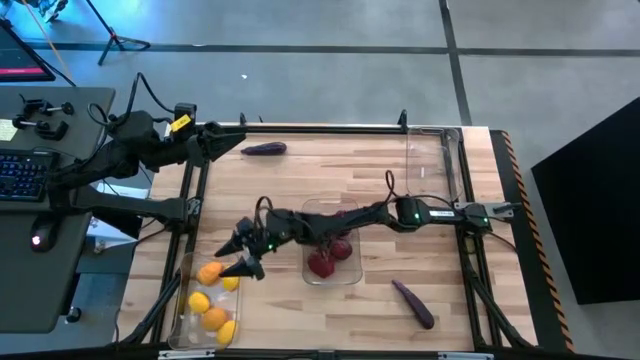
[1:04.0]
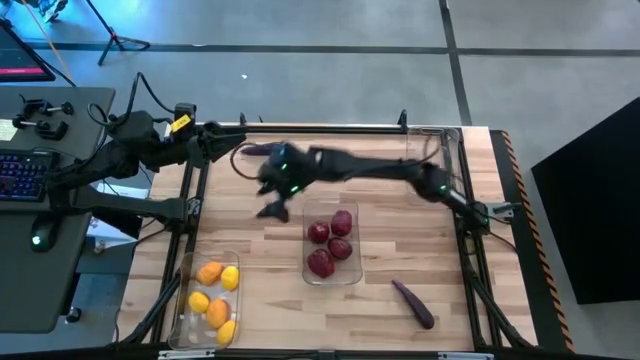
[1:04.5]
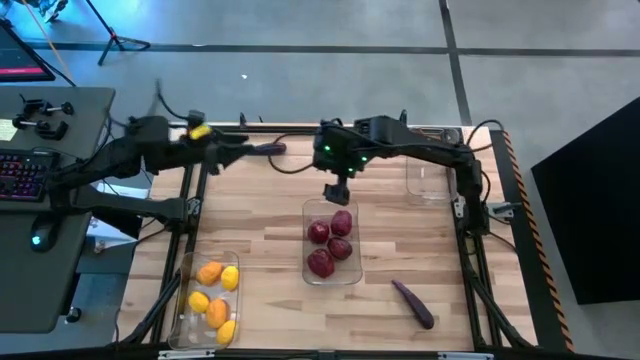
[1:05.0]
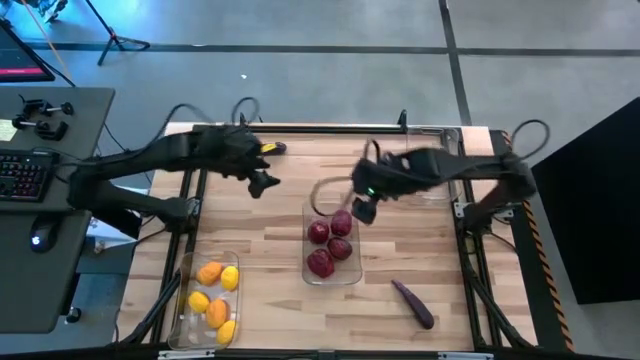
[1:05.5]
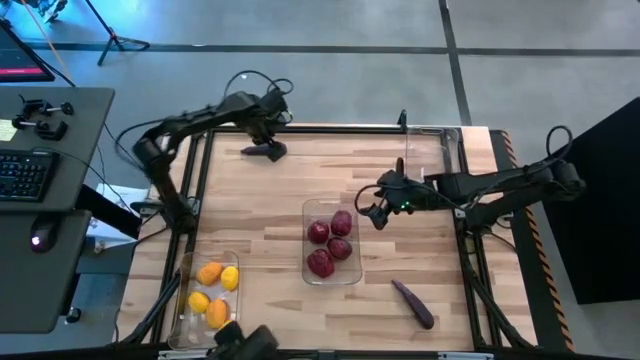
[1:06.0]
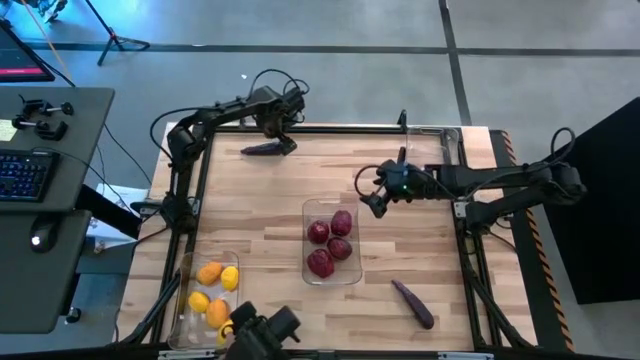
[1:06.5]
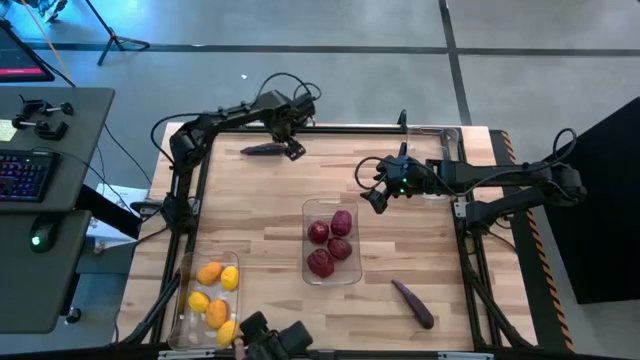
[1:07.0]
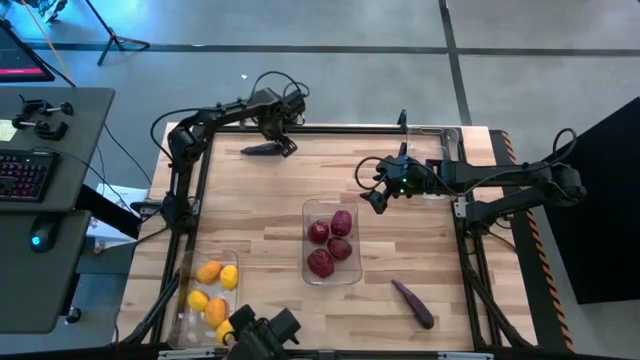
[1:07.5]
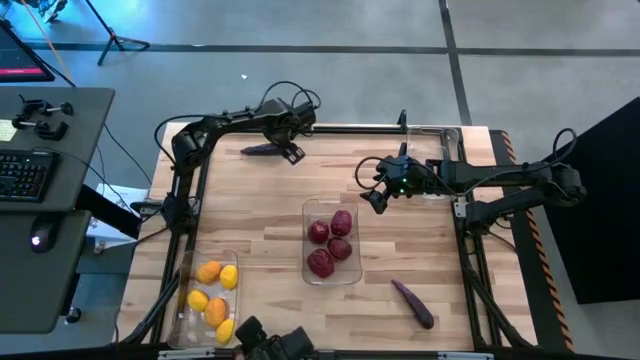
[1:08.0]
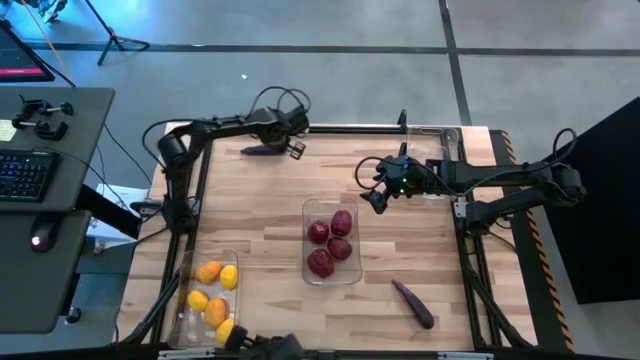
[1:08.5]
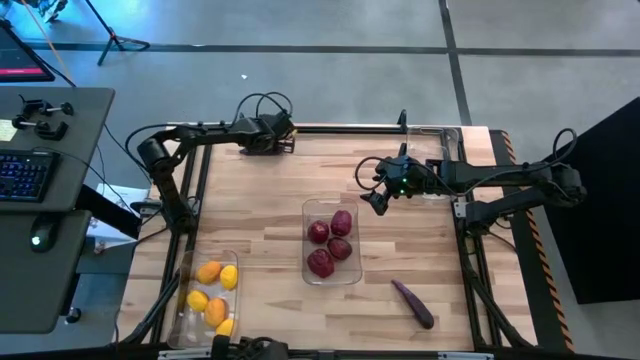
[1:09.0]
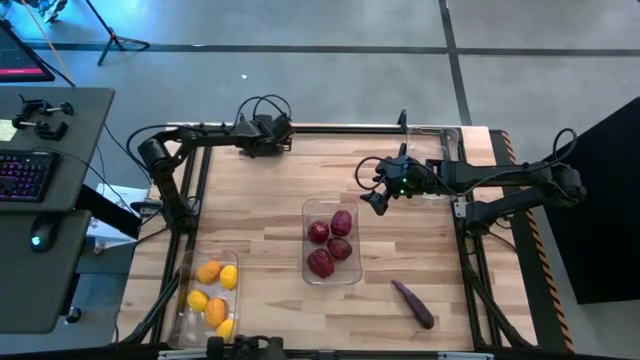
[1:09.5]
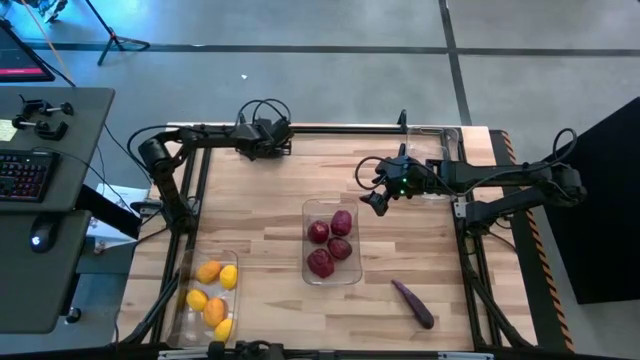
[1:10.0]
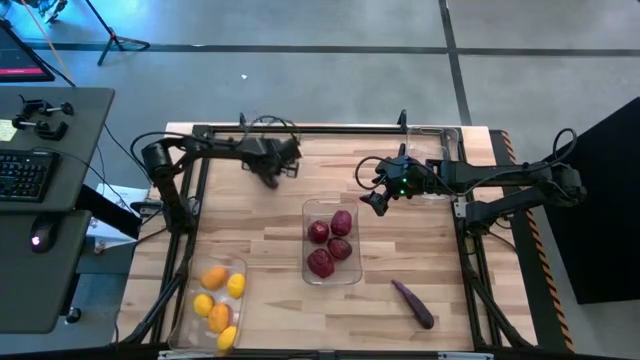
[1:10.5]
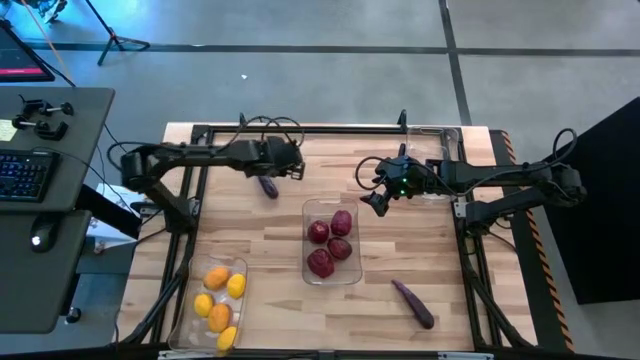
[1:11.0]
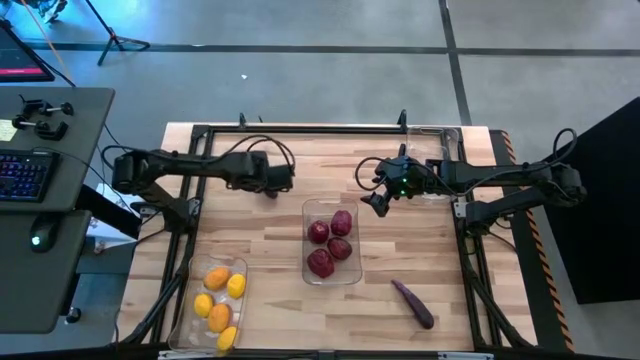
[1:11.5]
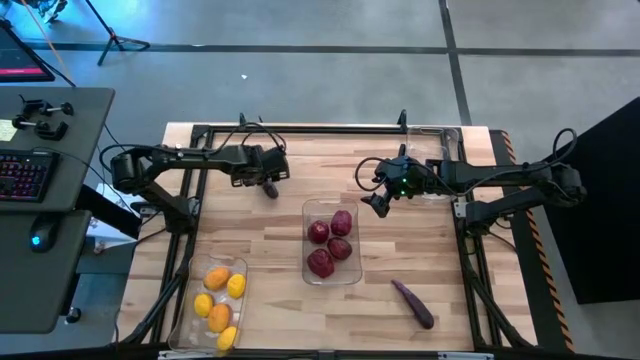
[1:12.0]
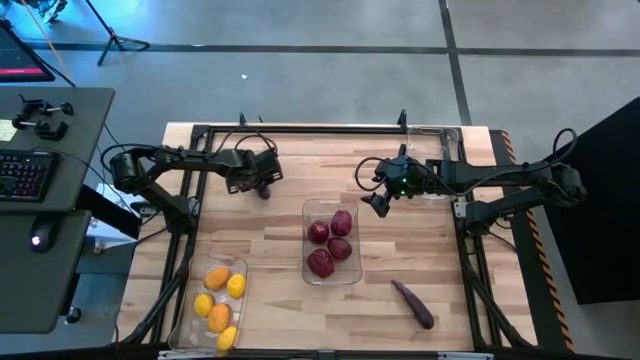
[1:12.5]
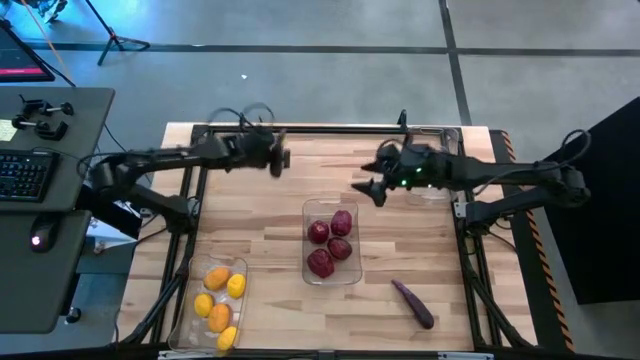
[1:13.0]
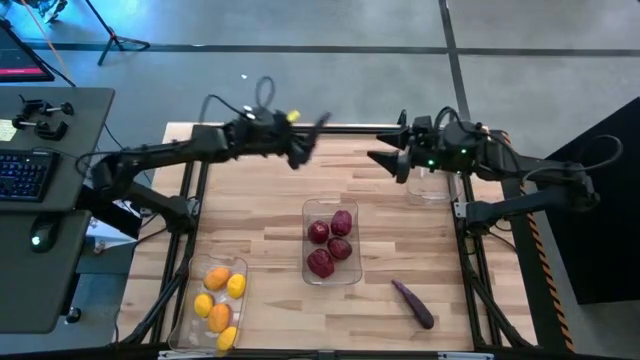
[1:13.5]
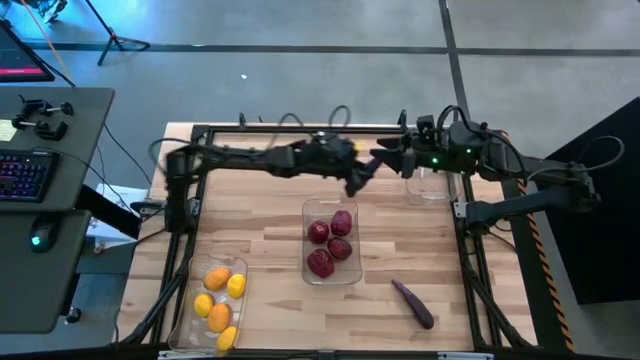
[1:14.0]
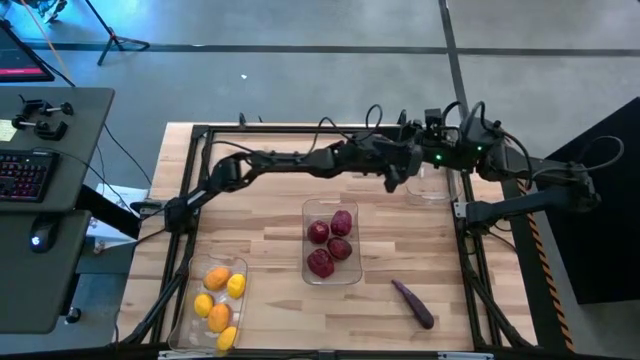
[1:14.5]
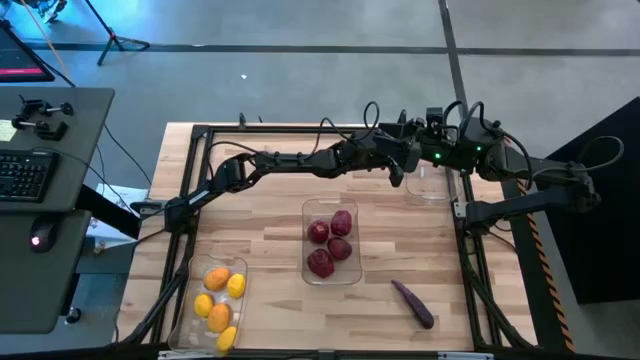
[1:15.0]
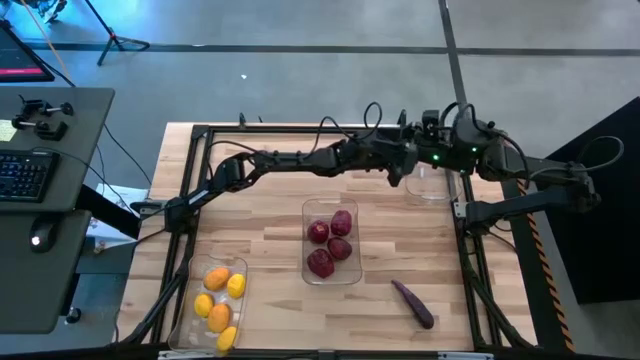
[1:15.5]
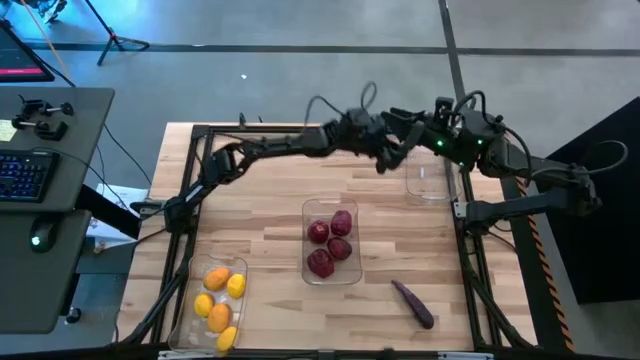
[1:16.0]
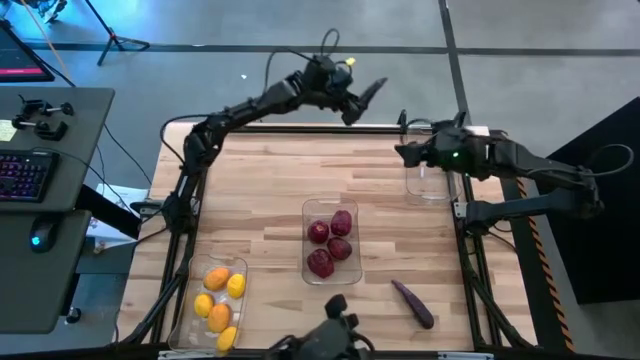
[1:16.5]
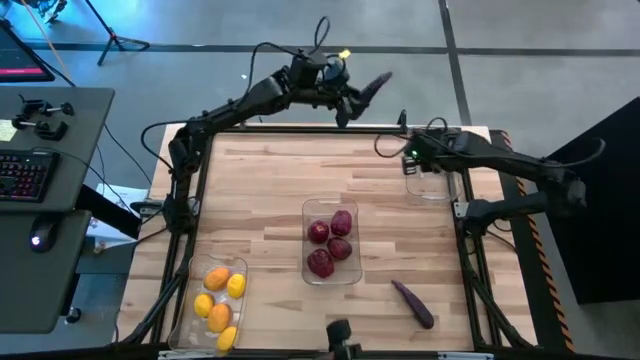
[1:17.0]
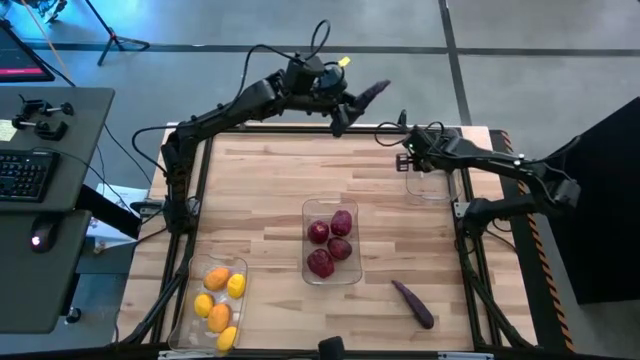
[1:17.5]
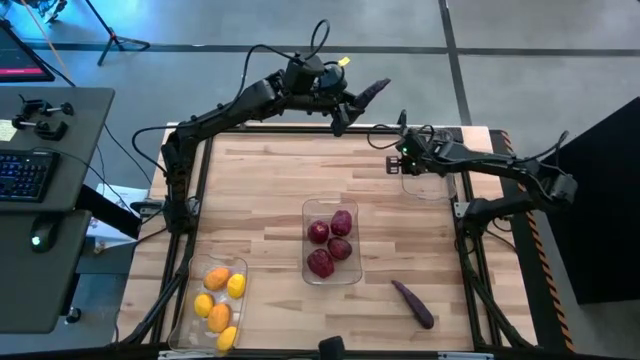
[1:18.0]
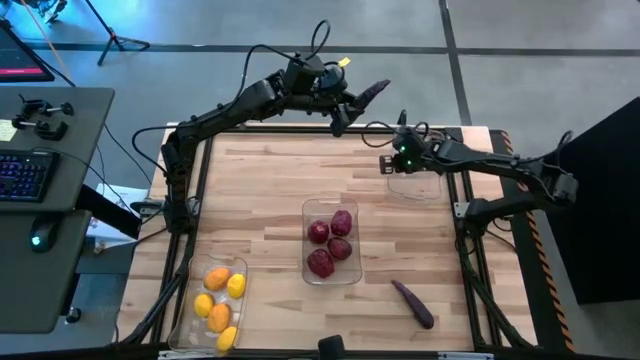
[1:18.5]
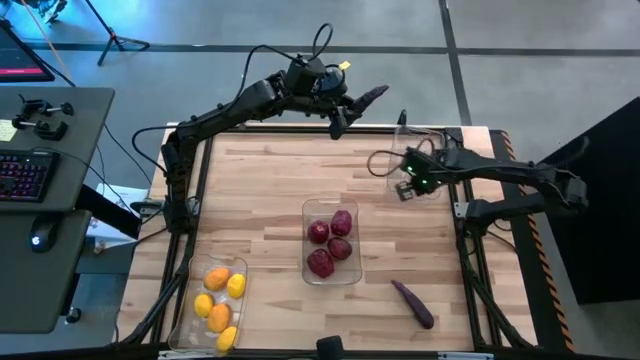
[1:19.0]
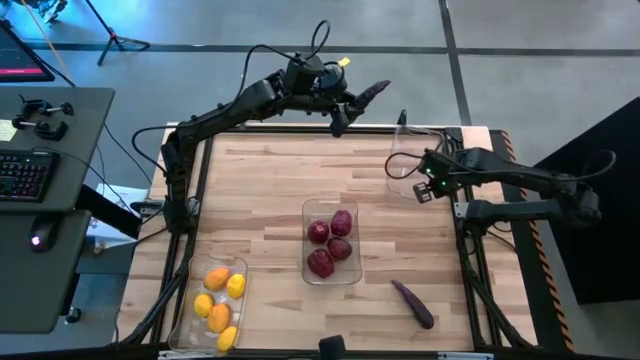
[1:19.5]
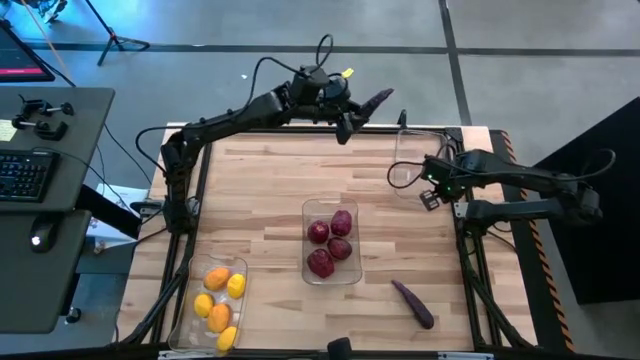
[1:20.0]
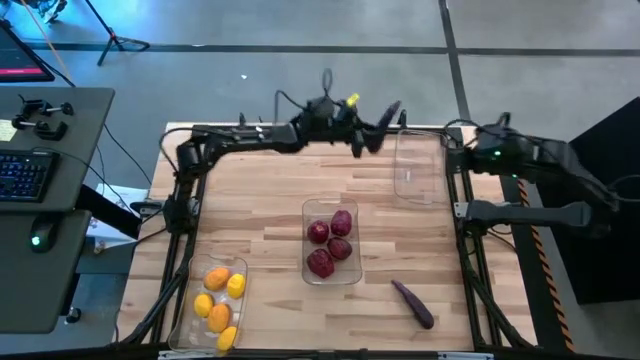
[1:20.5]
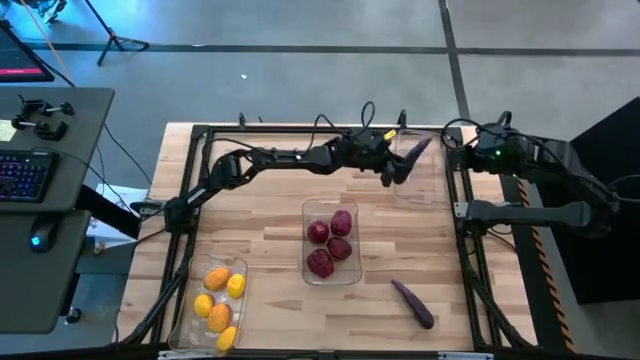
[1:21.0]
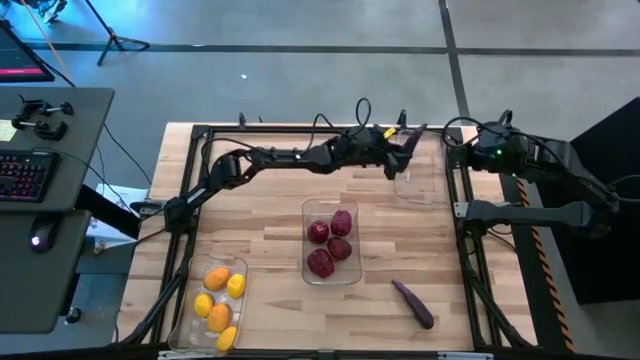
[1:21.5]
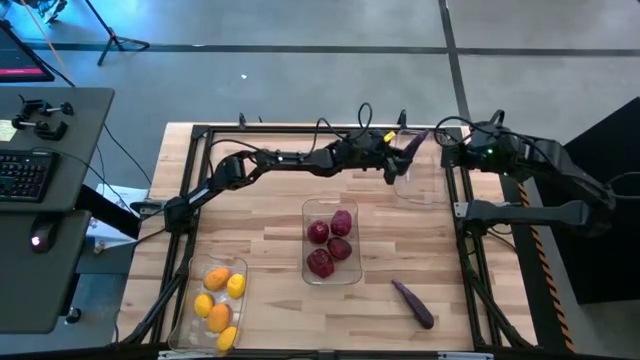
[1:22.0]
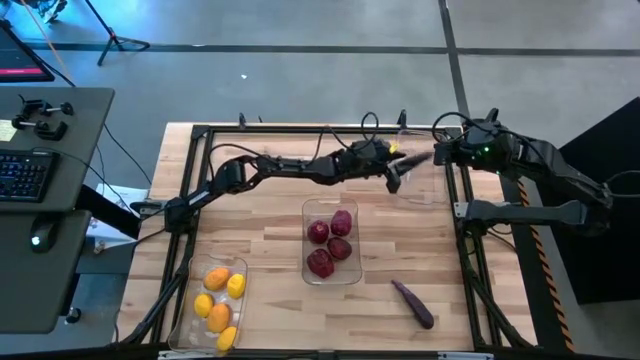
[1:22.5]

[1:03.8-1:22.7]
Task: Sort produce into baskets
Put the purple eggplant into the top right transparent bin

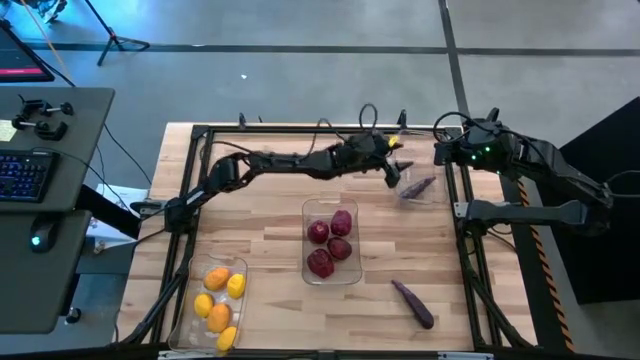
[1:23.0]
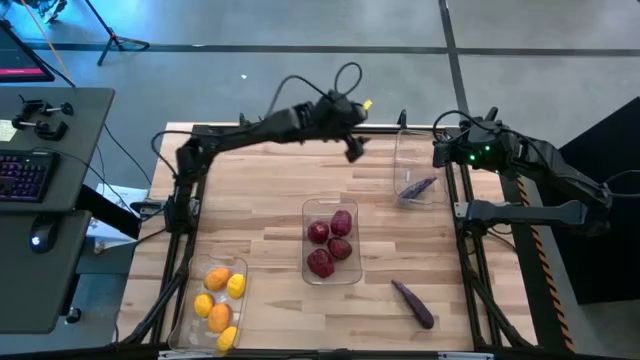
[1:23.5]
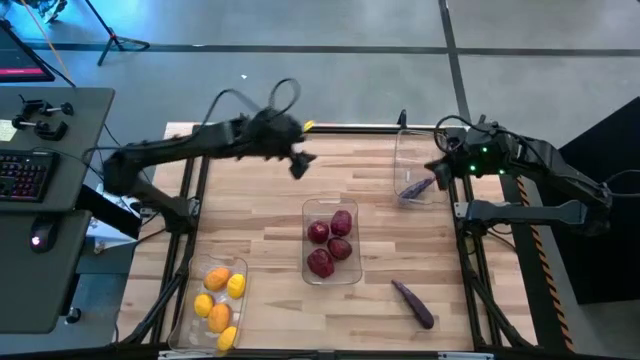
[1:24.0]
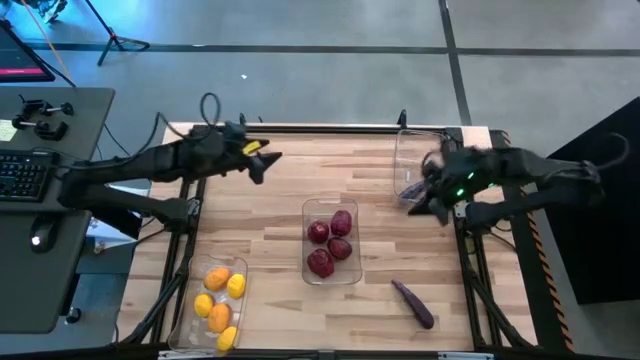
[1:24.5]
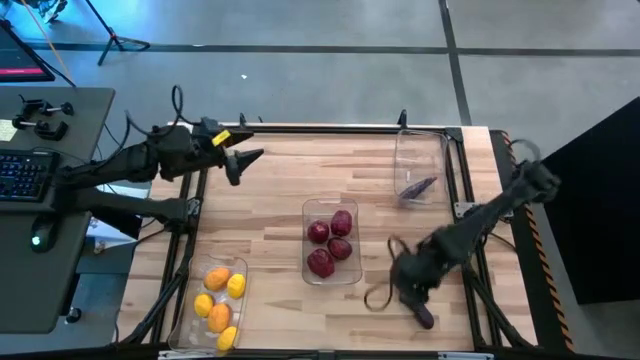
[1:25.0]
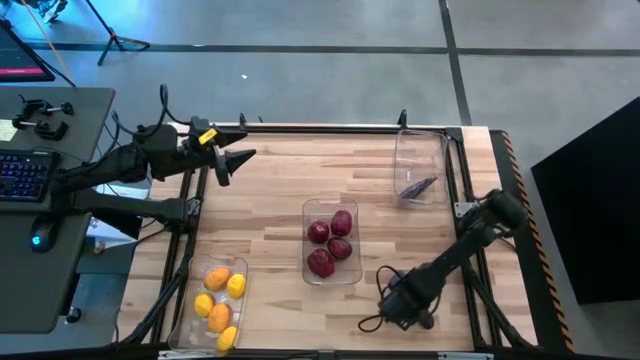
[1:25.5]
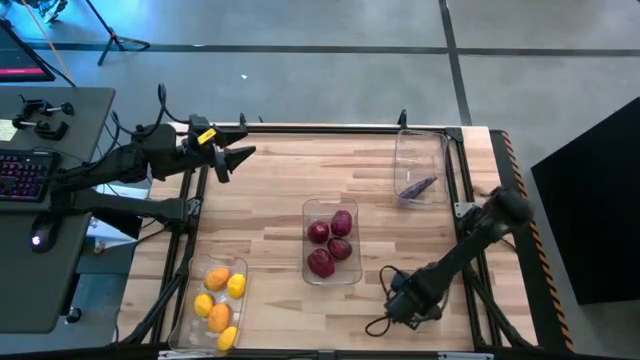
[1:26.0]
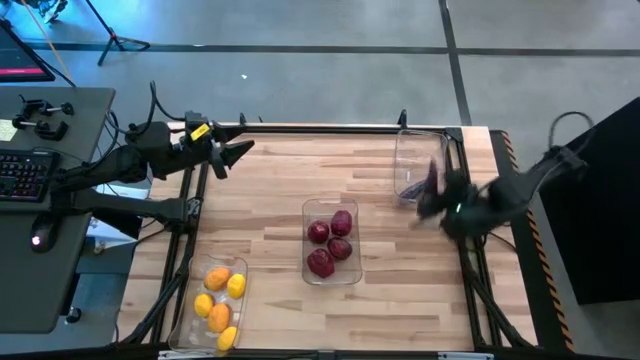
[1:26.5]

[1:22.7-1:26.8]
Put the eggplant into the top right transparent bin
